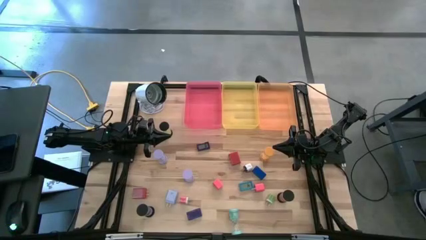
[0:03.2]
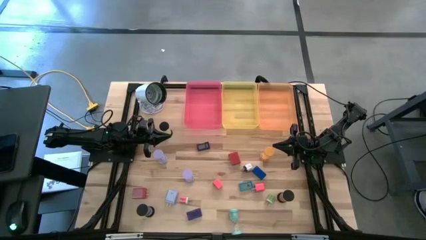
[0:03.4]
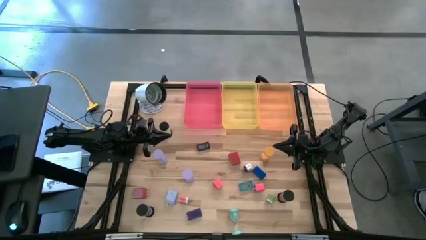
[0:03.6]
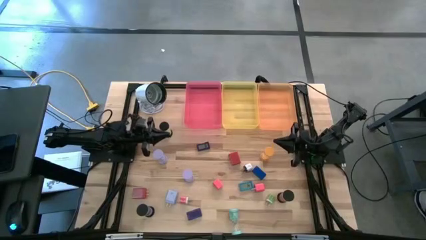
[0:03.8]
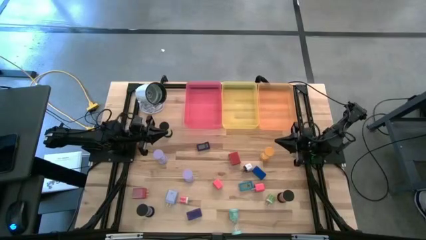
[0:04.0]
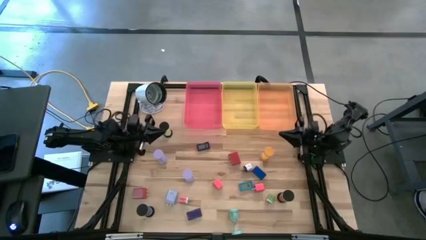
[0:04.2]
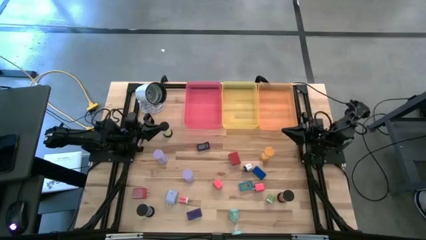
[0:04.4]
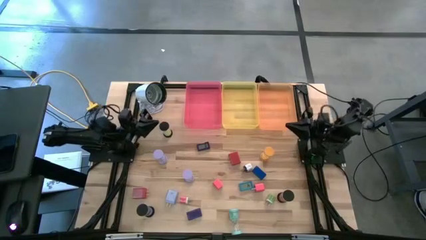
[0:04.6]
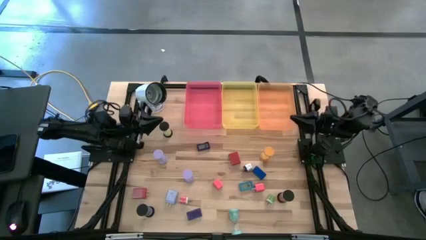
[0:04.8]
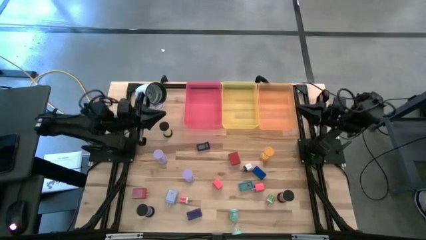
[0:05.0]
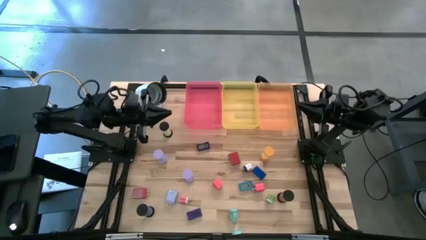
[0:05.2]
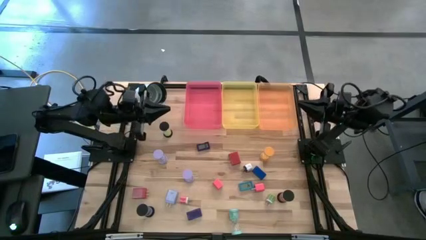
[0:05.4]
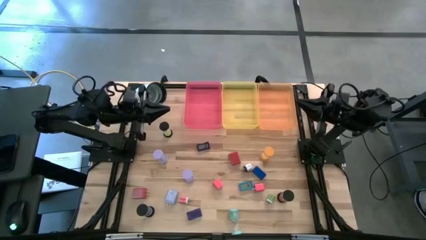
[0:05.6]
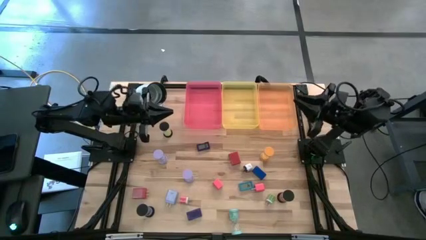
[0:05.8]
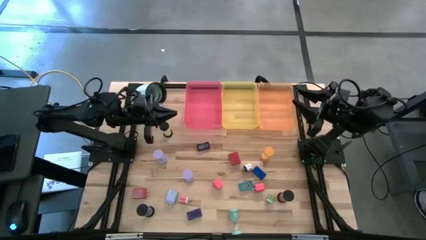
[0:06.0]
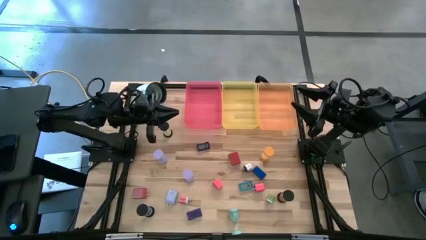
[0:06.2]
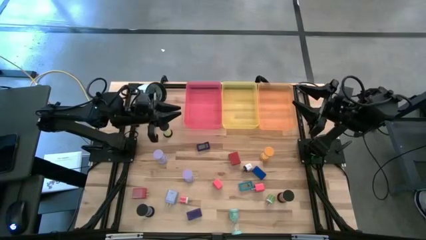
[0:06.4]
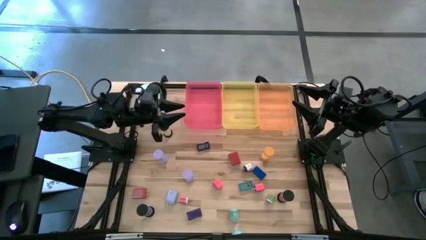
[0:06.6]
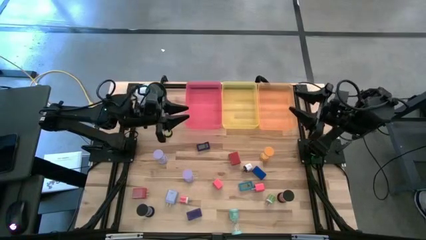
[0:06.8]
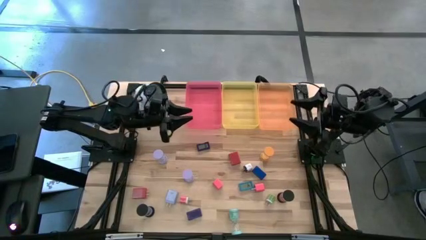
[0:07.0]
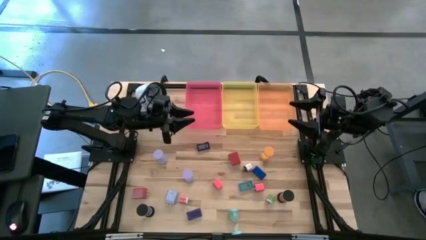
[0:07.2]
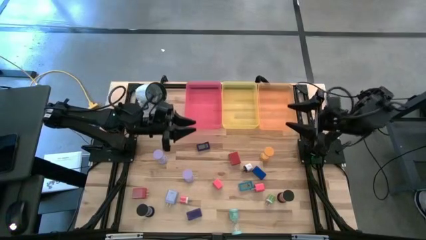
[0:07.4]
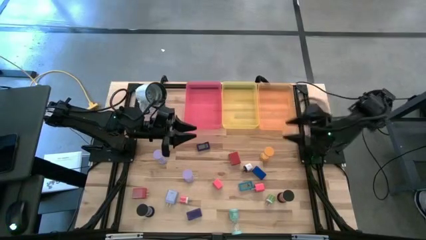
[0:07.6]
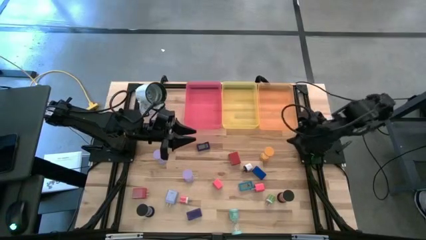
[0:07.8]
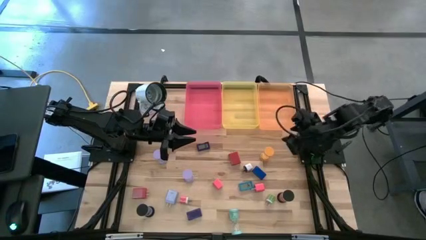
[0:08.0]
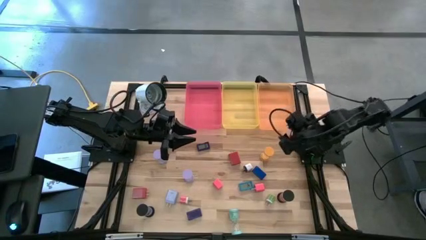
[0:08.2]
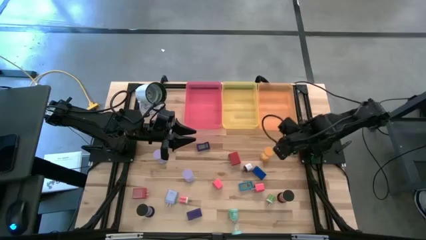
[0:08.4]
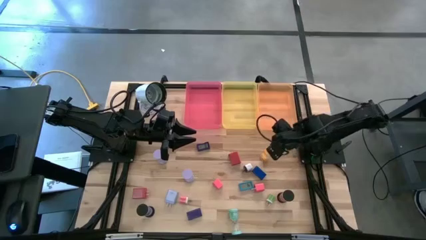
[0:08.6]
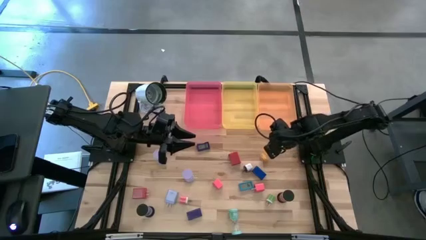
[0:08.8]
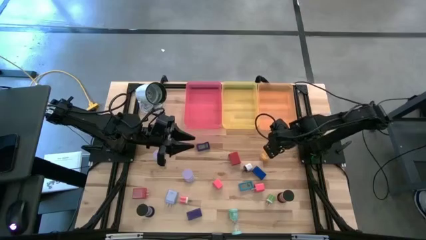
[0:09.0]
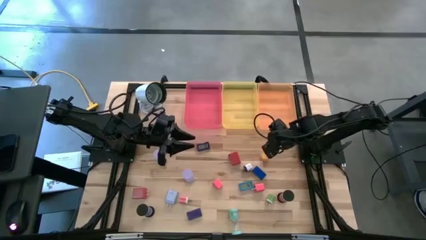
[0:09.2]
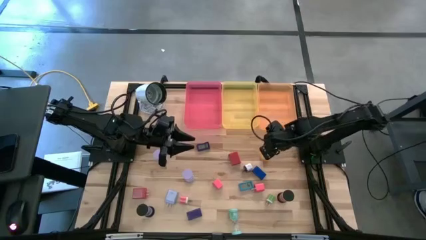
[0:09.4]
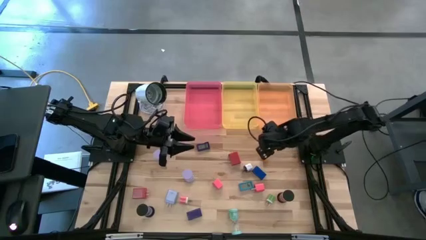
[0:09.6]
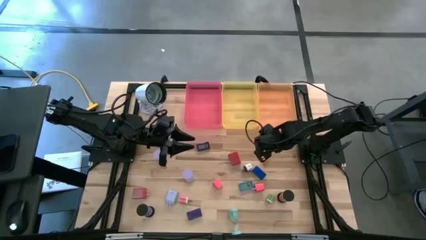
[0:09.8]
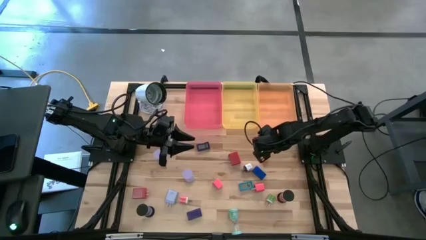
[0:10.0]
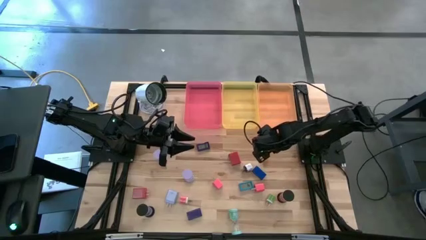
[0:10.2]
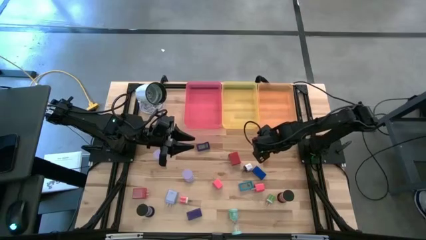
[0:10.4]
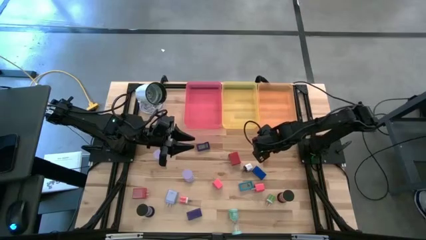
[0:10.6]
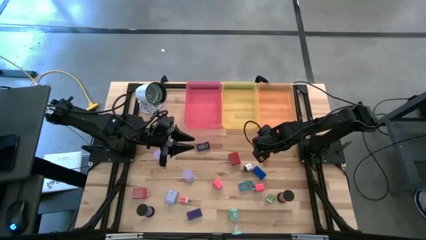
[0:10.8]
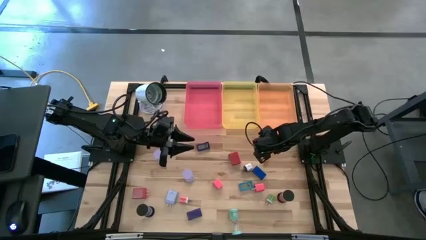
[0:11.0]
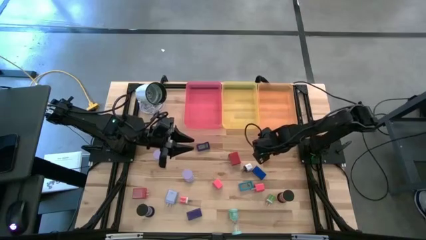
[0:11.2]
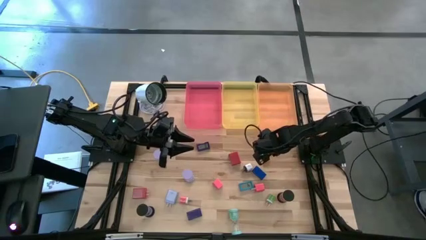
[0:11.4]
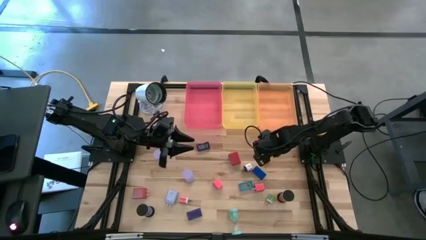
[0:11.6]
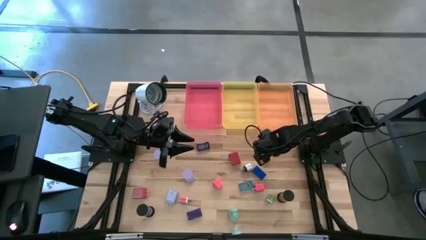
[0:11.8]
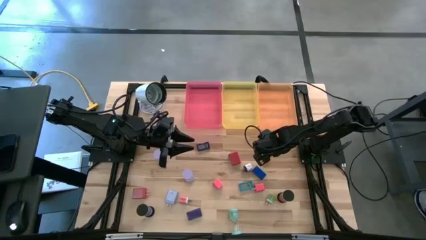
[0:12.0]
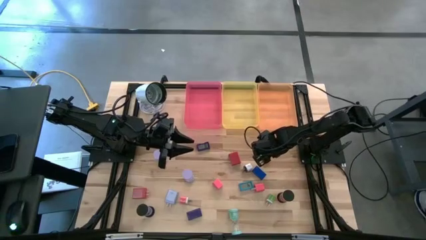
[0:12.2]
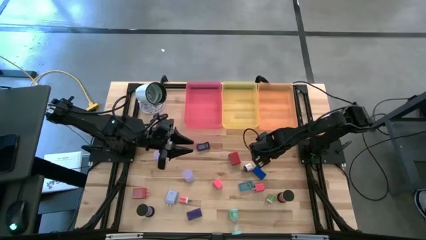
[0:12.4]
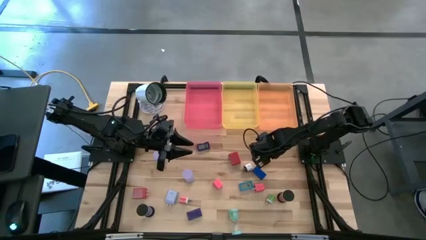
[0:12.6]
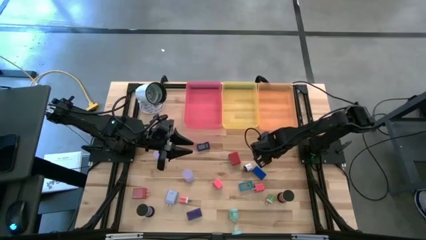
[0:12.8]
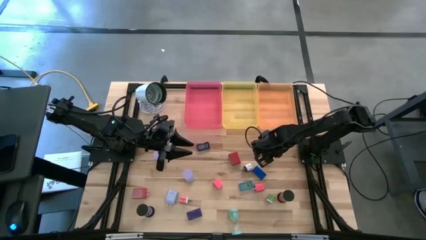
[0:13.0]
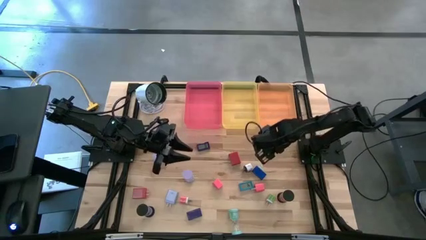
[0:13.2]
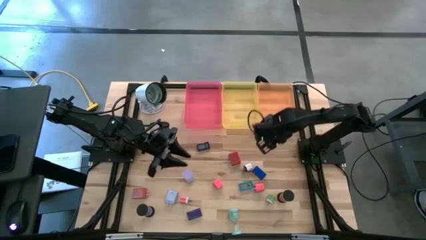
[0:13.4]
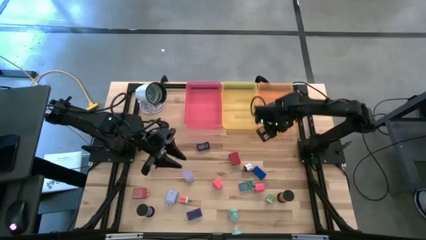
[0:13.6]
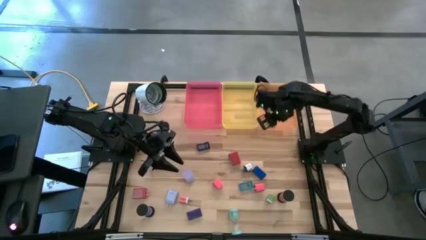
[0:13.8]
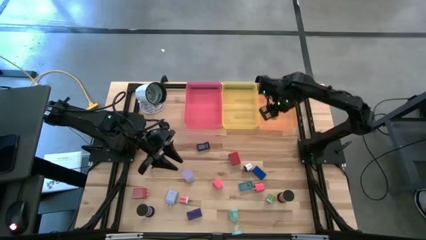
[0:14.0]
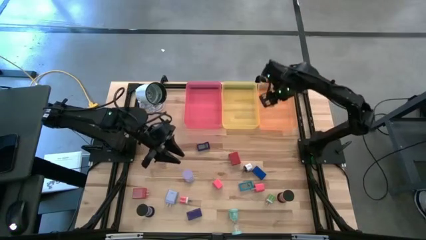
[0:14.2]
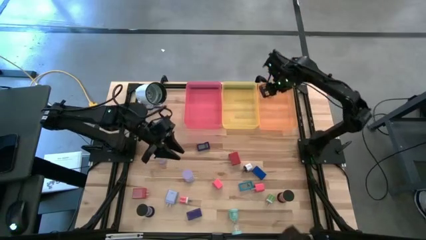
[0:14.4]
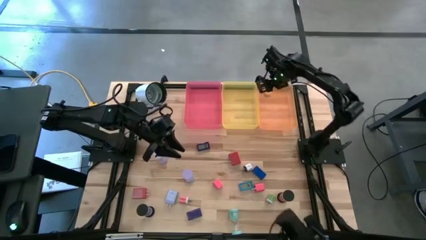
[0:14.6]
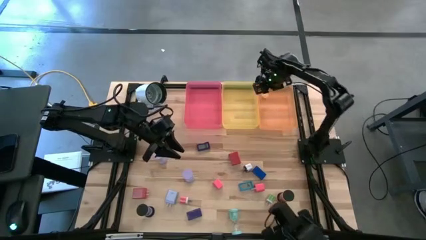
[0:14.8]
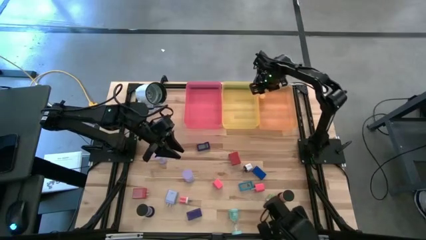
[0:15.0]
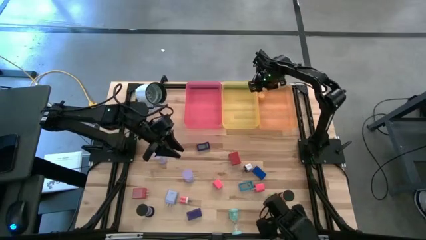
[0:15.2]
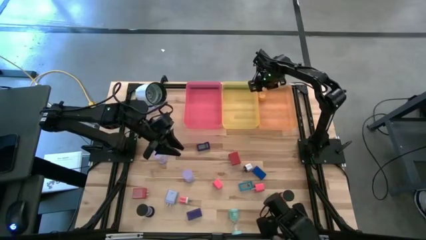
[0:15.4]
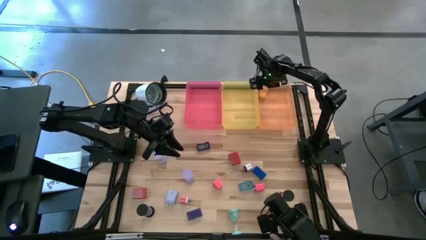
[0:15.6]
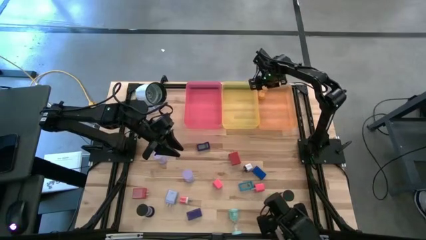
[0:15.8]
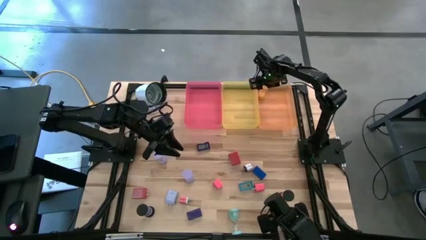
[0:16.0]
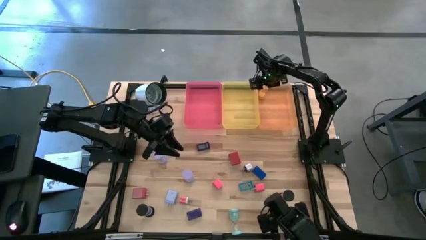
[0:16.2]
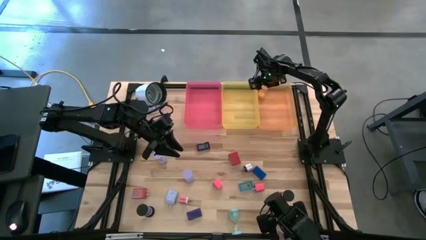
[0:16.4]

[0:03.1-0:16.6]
Task: Pick & Place Office items
Put the yellow hourglass into the orange bin
